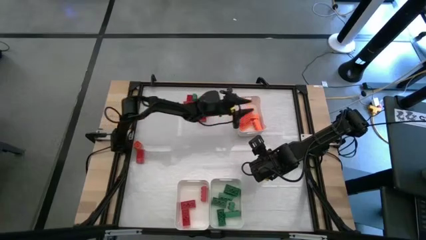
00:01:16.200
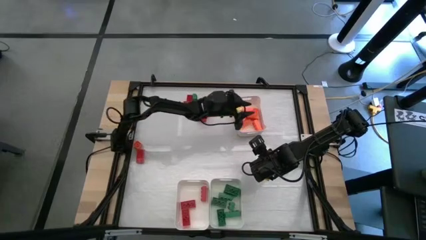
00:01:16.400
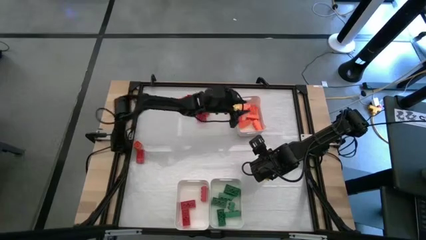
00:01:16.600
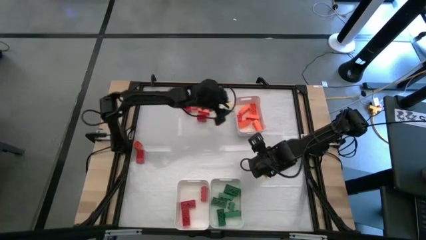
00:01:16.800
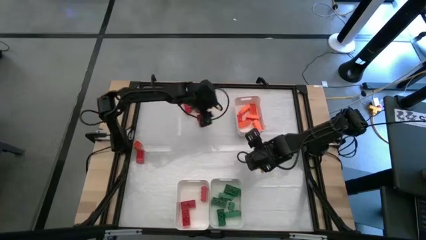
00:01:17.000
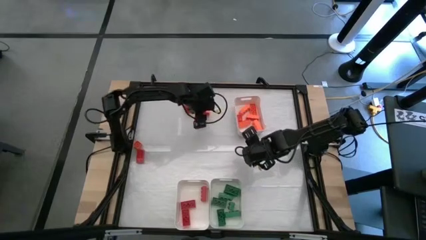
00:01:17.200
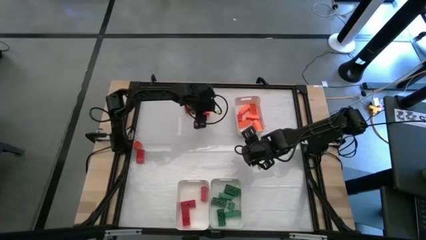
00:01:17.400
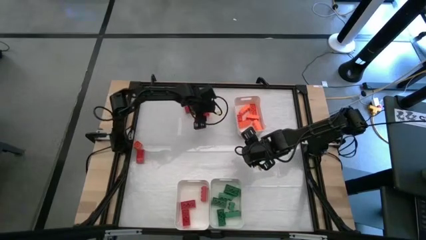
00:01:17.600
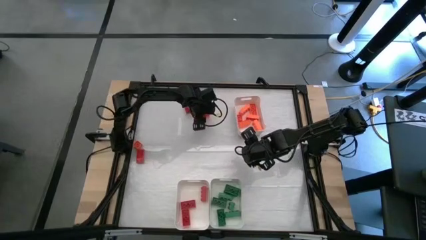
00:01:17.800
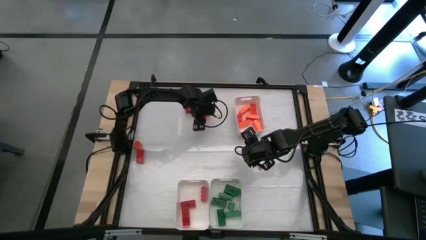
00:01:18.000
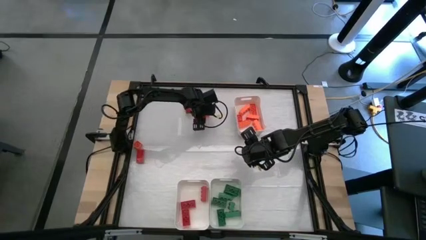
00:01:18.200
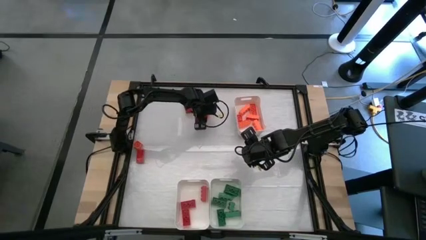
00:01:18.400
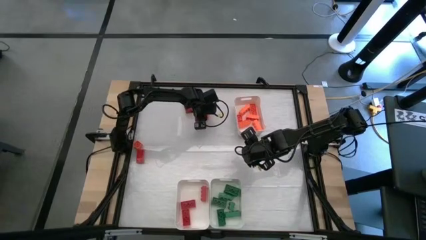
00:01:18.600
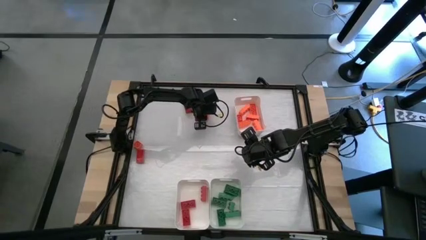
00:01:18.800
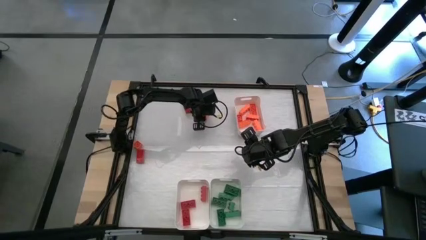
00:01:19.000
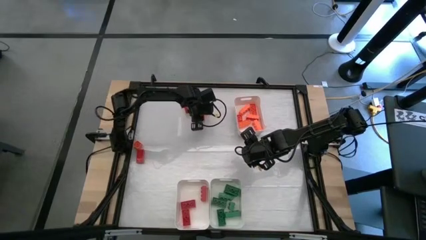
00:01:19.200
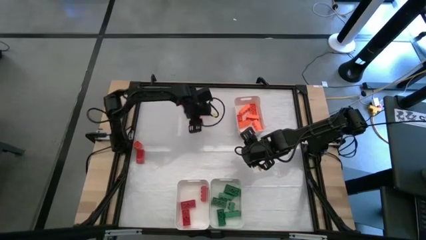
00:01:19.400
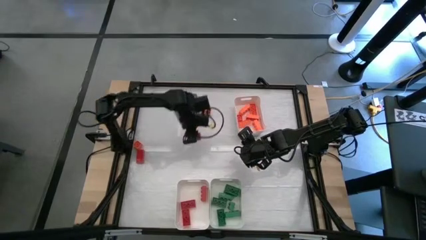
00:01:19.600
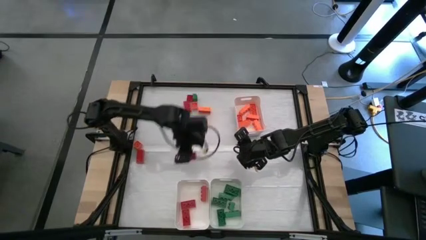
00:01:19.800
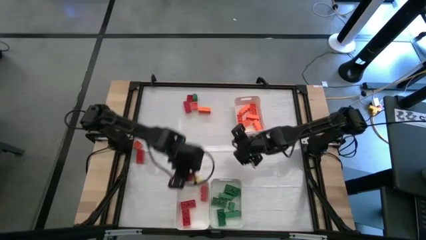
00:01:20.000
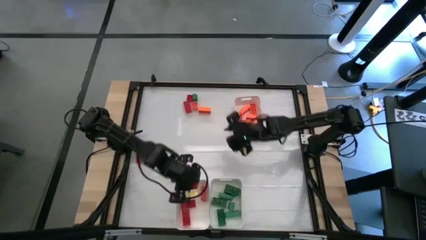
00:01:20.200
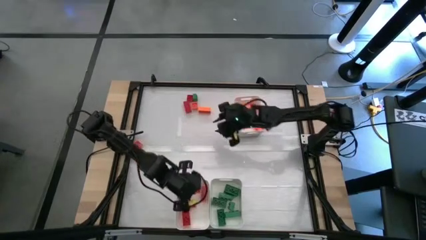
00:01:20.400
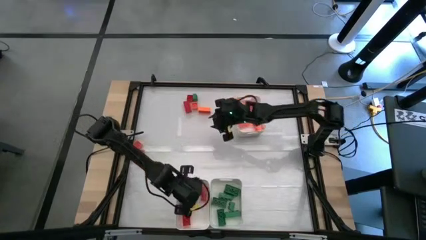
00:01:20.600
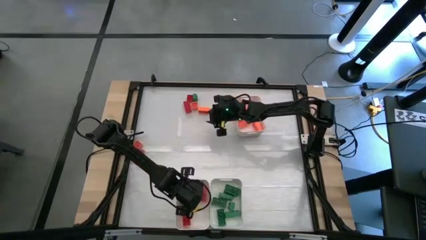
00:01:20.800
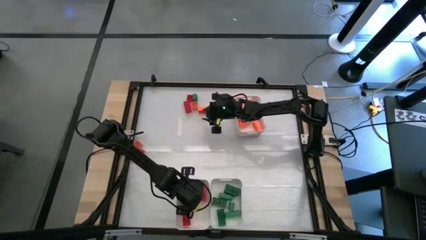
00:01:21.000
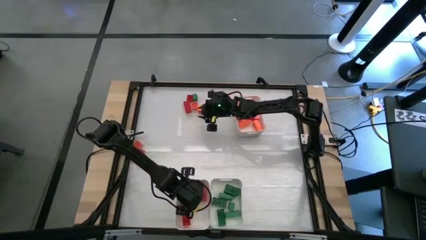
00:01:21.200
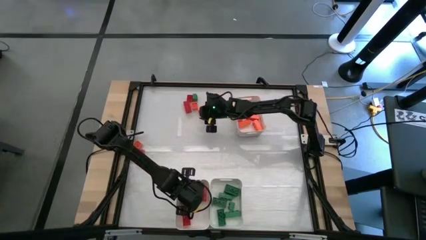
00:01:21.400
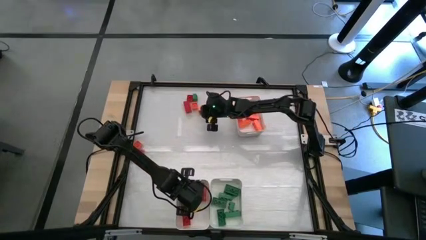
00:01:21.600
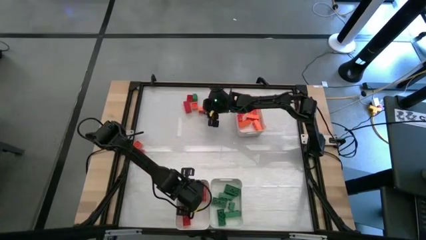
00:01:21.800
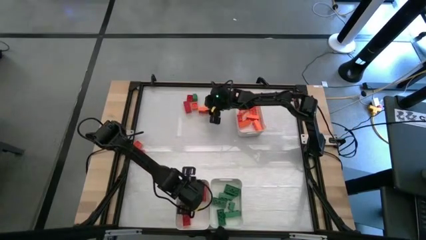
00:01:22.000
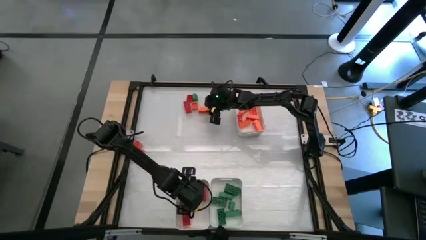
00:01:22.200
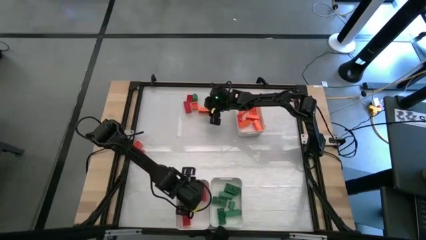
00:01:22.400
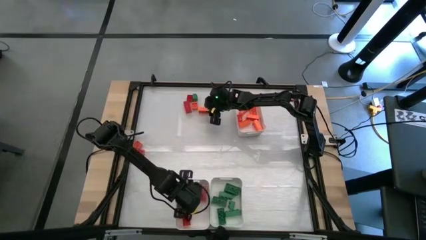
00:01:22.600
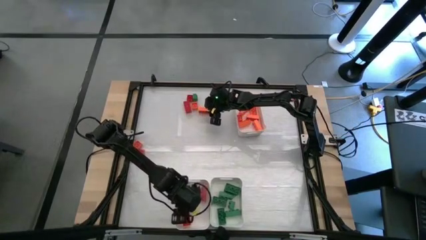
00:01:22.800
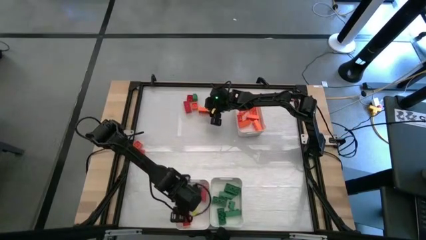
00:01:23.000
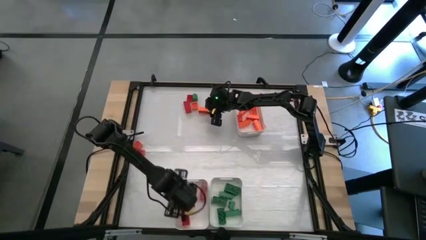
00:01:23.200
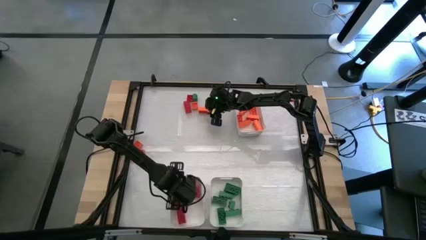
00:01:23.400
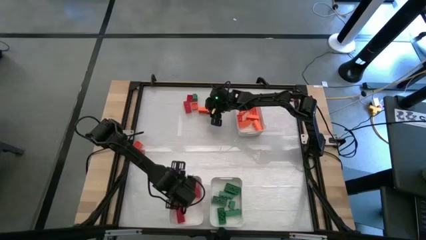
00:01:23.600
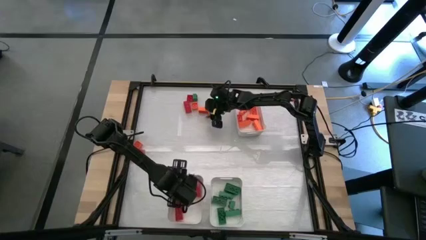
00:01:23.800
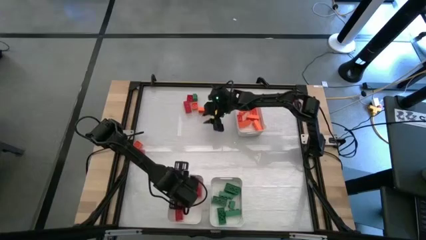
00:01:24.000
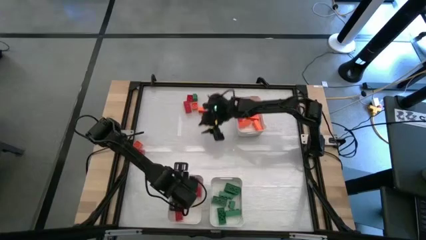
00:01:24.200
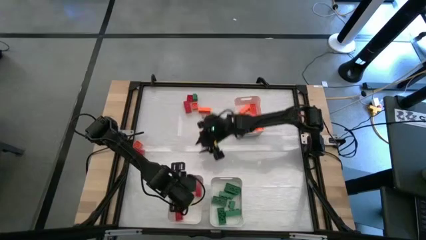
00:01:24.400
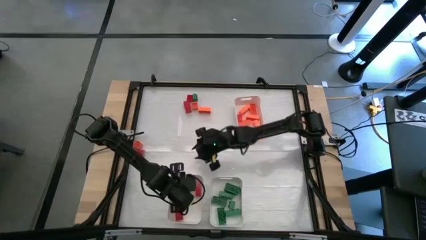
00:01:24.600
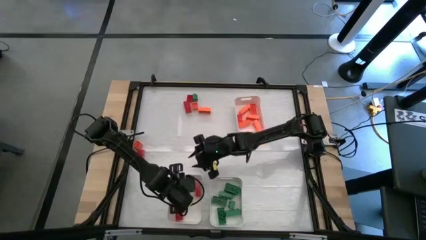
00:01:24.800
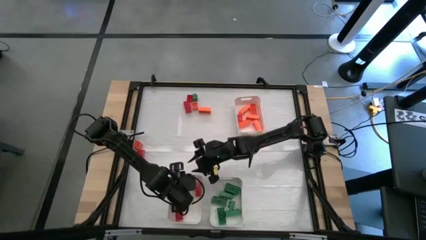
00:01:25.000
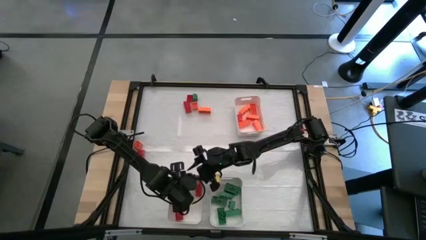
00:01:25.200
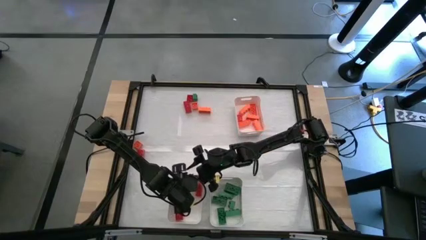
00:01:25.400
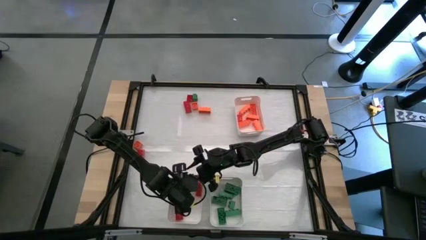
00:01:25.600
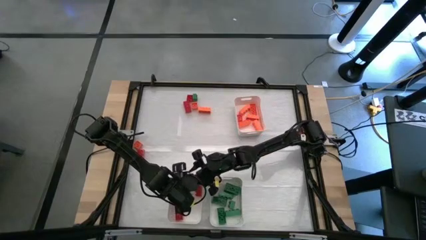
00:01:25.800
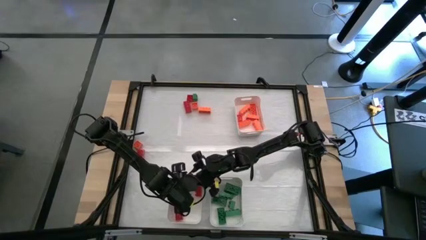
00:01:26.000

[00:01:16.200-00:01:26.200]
Task: Sort blocks
Put the red game piece into the bottom left white bin

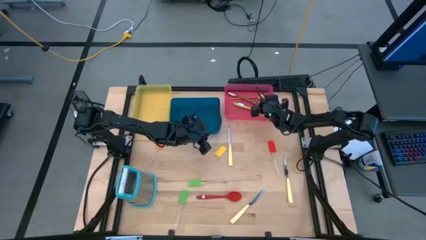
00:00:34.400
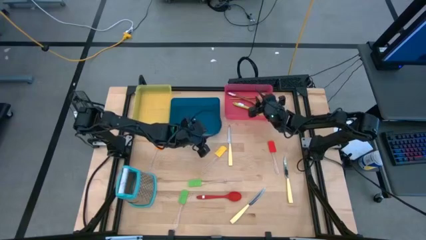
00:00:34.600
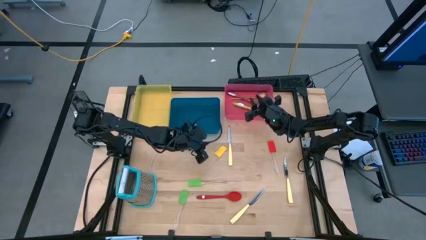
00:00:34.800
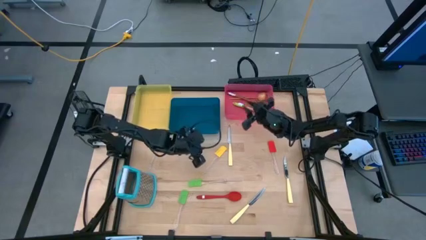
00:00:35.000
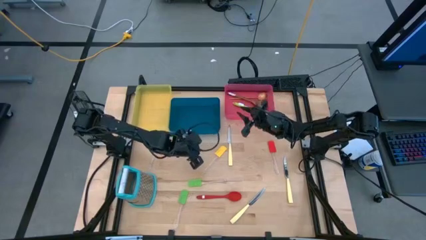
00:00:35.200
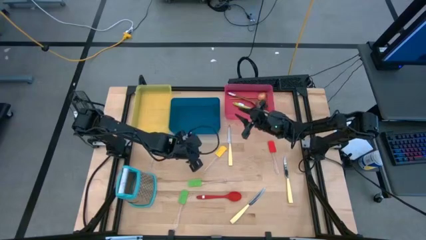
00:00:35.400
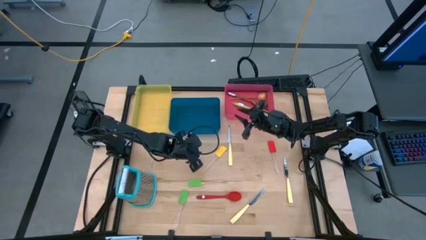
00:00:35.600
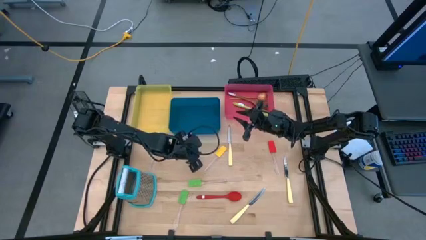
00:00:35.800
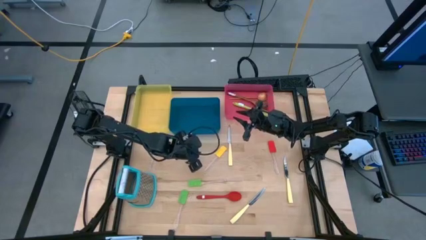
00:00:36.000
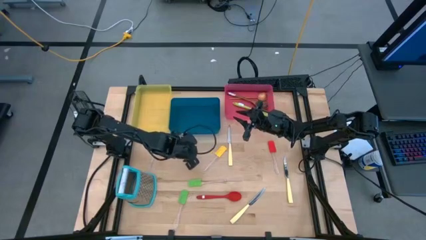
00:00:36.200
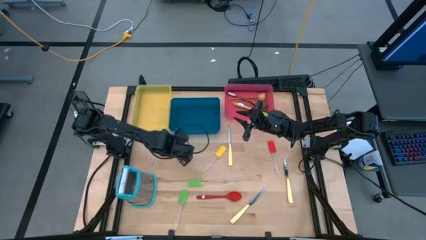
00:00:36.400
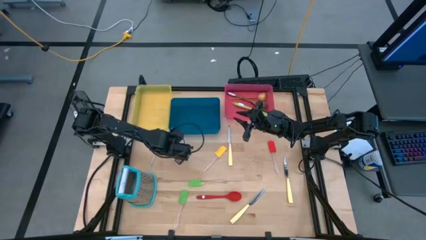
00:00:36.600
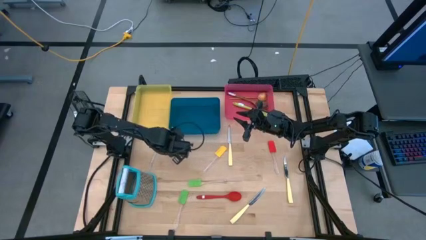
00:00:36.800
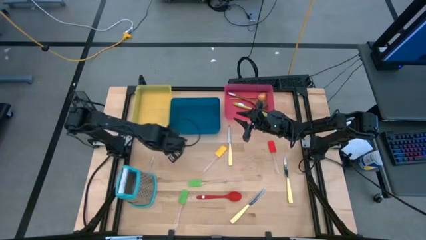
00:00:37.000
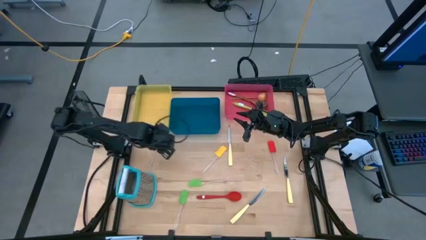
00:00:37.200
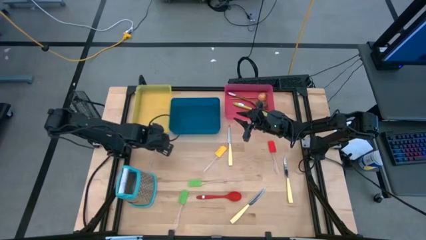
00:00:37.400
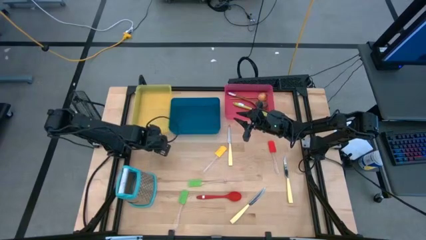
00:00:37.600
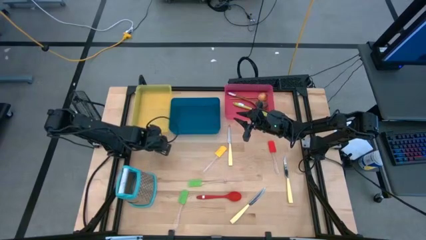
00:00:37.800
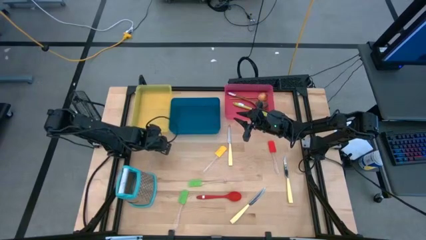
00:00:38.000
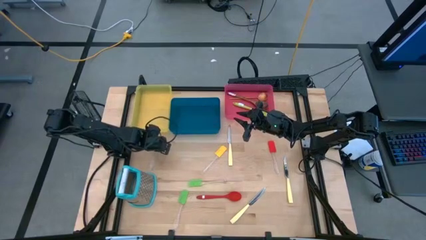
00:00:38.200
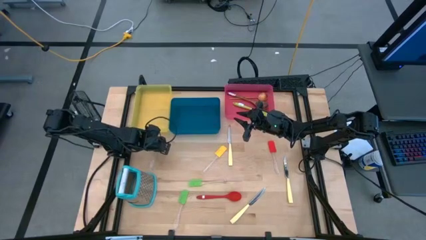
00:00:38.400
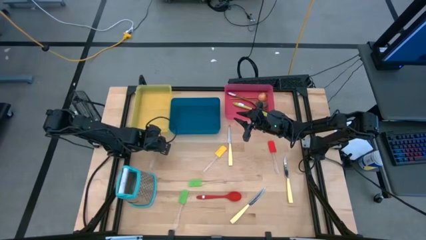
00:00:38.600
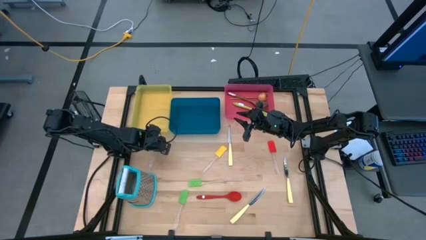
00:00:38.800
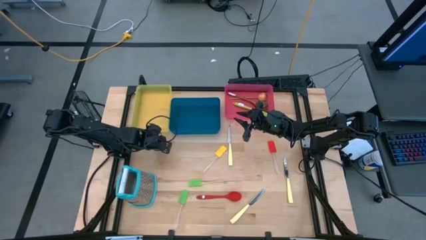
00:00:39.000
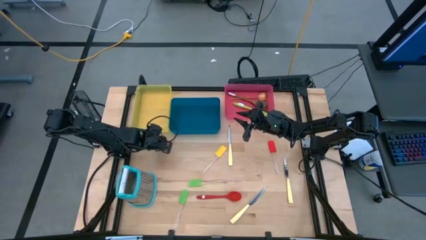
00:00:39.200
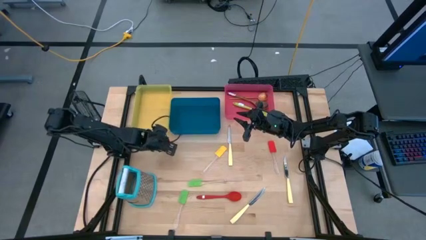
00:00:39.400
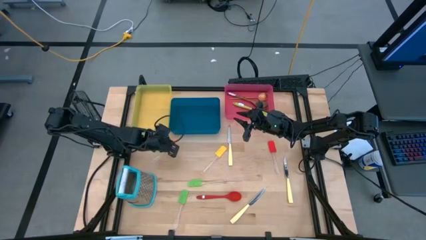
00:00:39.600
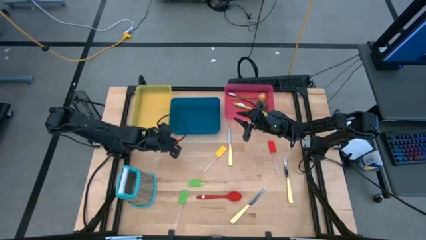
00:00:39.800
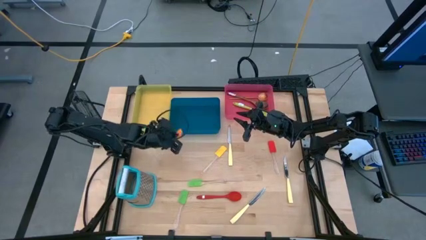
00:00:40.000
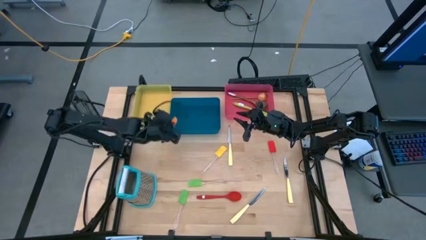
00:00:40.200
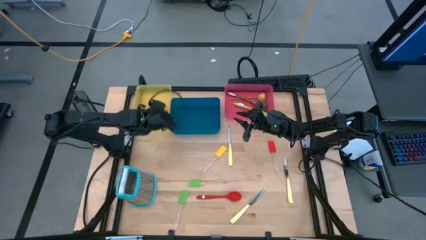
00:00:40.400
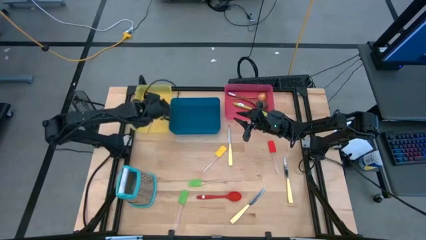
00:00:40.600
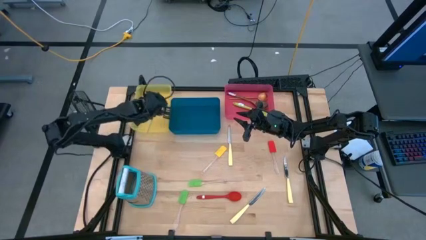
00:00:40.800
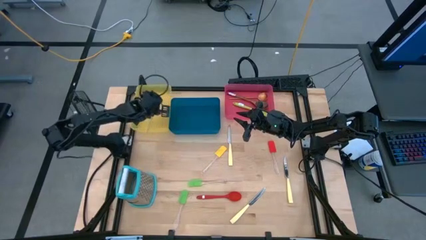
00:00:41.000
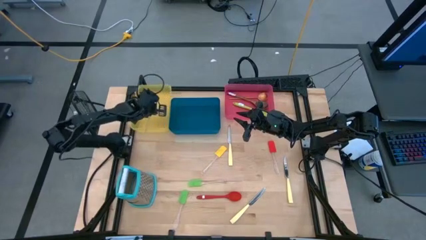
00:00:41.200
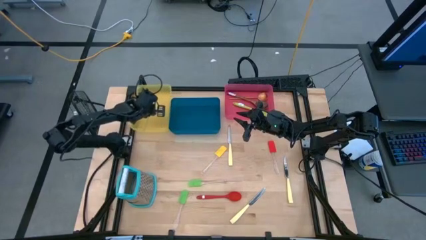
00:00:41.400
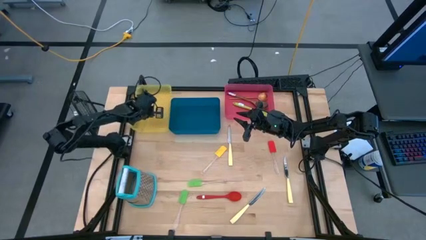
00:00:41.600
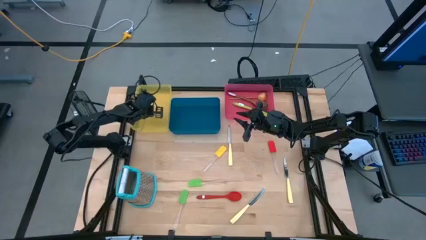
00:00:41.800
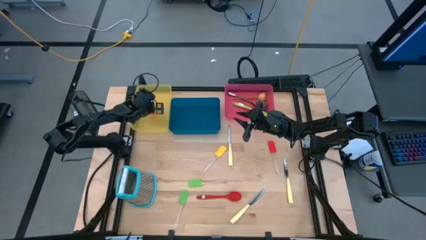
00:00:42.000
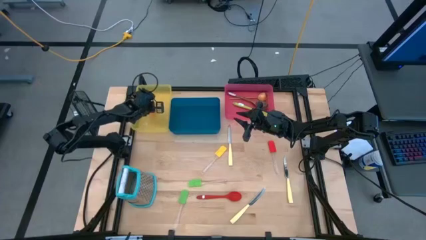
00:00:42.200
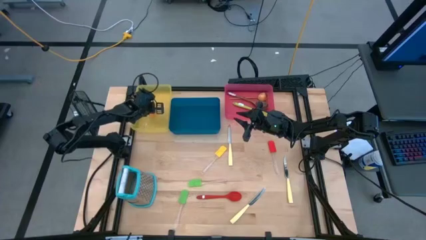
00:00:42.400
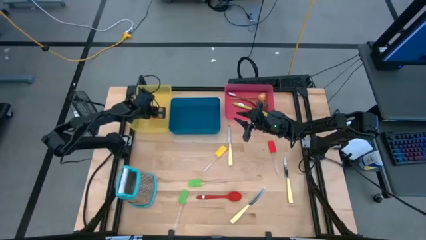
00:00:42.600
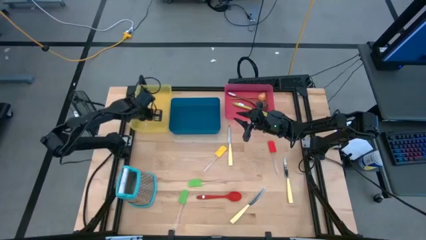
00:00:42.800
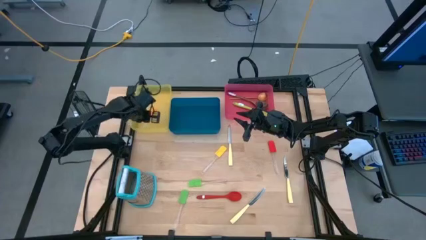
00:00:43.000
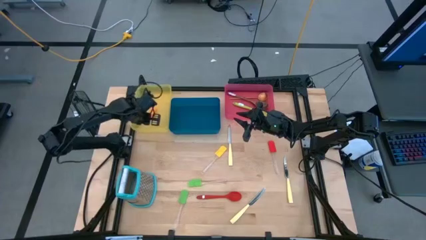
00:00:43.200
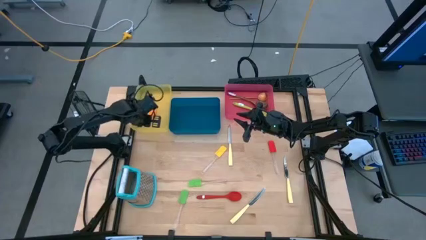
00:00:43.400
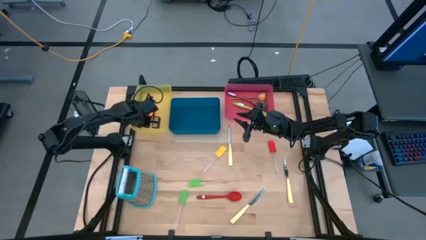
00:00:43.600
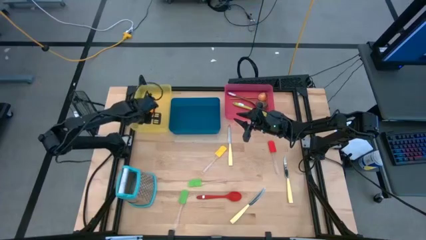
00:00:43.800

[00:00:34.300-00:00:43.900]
Task: Pick & Place Kitchen Items
Put the orange spatula into the yellow bin
